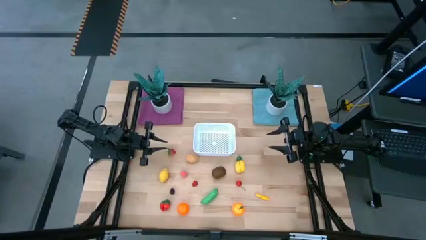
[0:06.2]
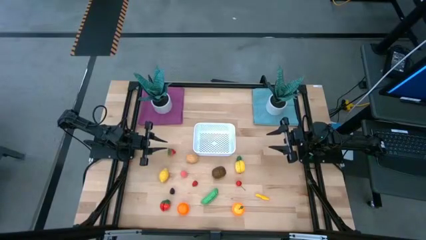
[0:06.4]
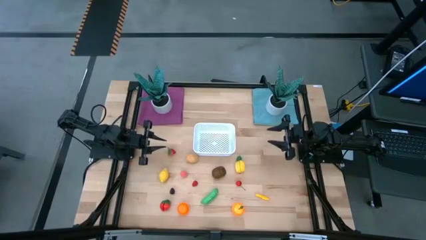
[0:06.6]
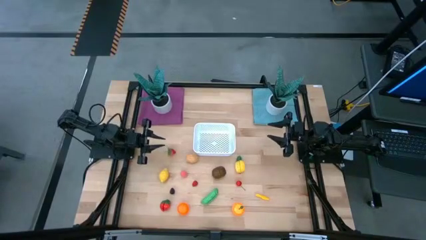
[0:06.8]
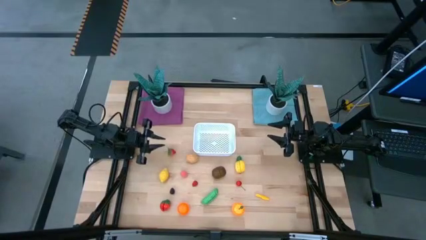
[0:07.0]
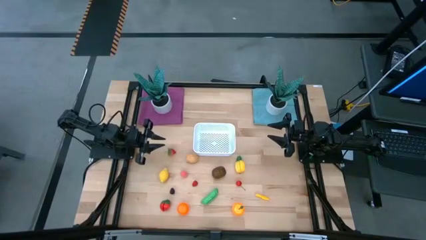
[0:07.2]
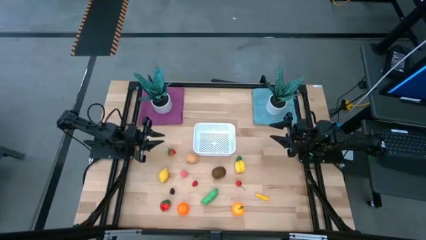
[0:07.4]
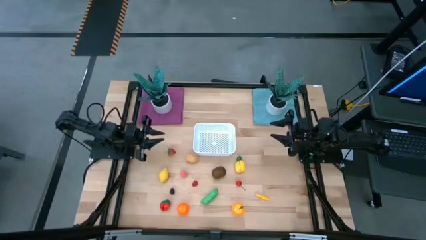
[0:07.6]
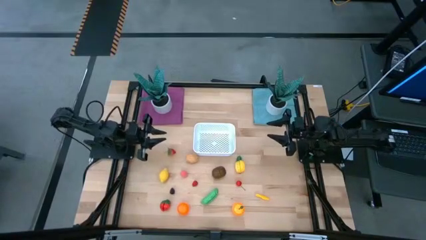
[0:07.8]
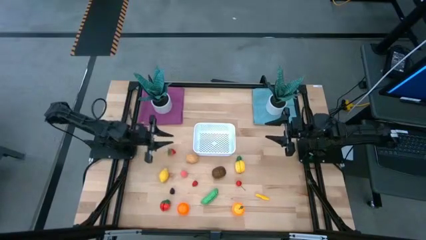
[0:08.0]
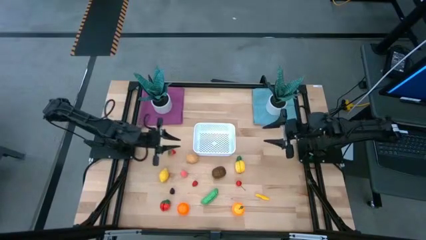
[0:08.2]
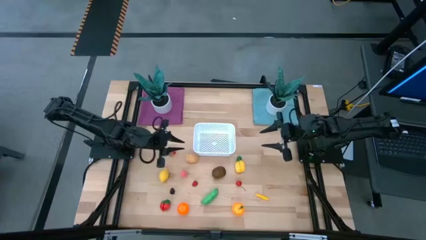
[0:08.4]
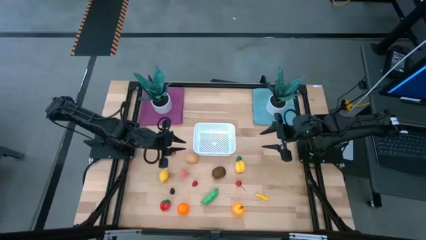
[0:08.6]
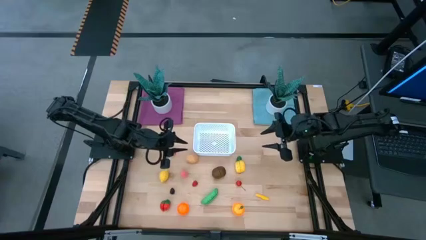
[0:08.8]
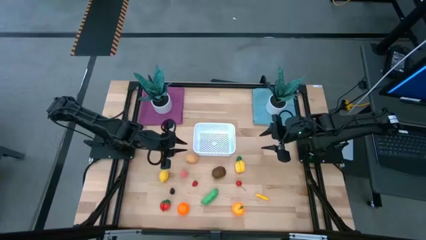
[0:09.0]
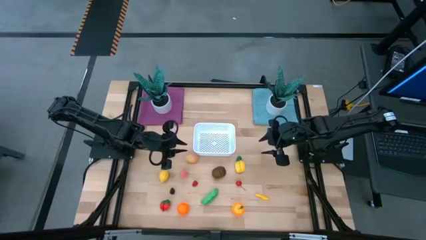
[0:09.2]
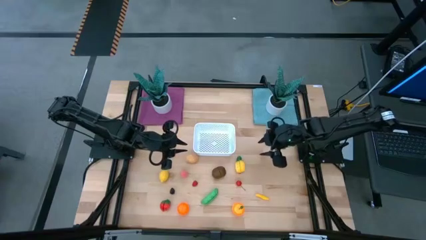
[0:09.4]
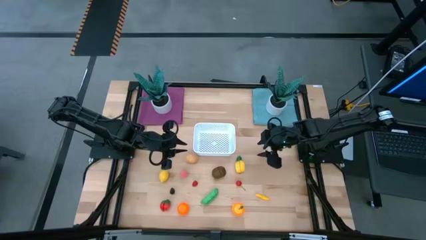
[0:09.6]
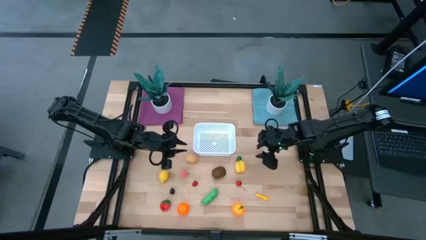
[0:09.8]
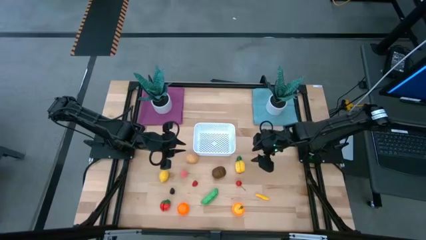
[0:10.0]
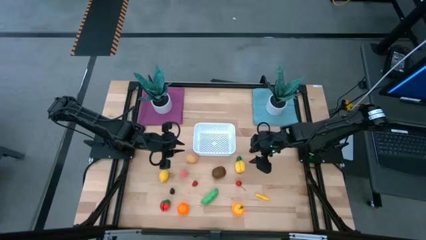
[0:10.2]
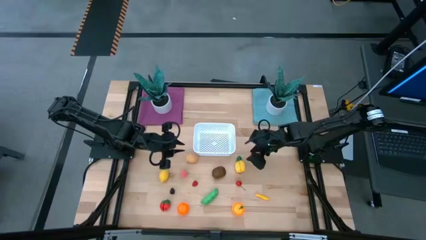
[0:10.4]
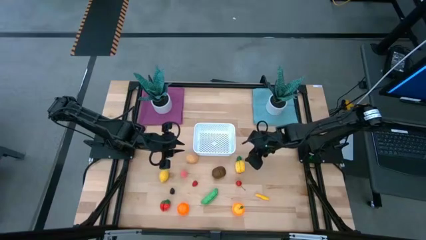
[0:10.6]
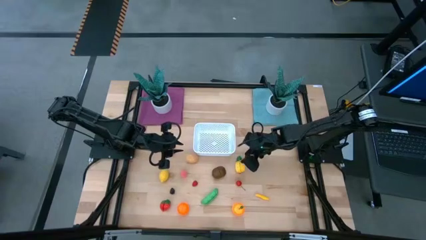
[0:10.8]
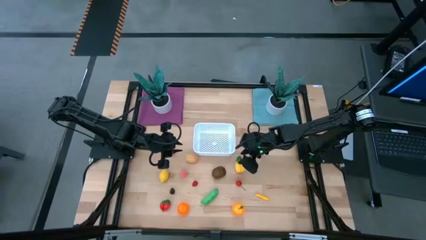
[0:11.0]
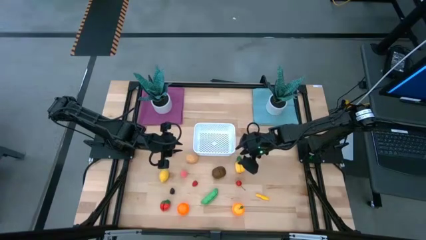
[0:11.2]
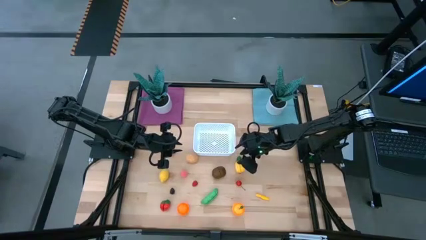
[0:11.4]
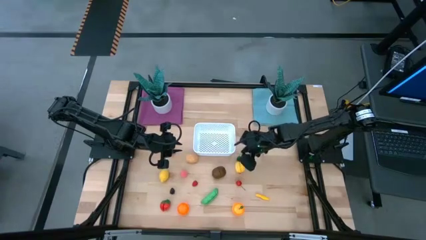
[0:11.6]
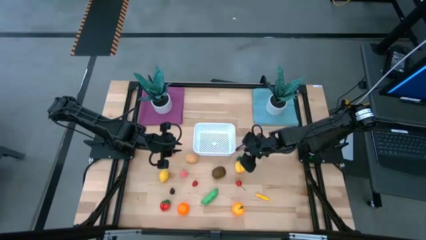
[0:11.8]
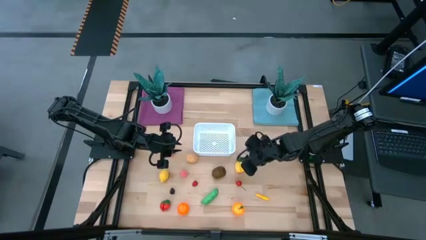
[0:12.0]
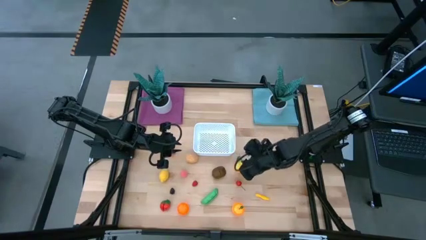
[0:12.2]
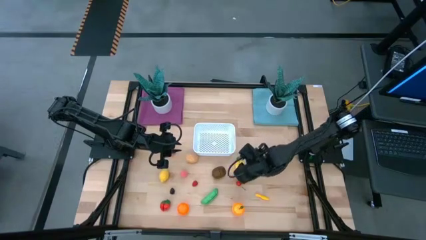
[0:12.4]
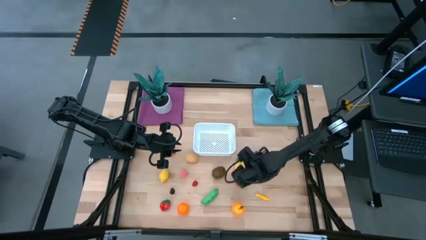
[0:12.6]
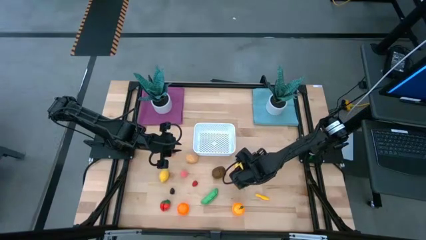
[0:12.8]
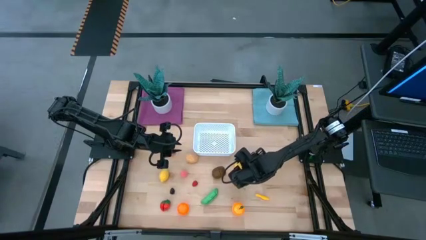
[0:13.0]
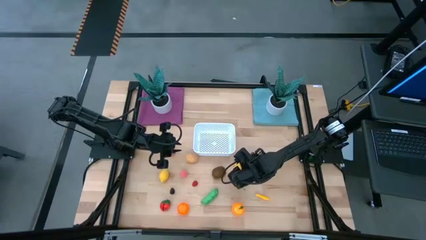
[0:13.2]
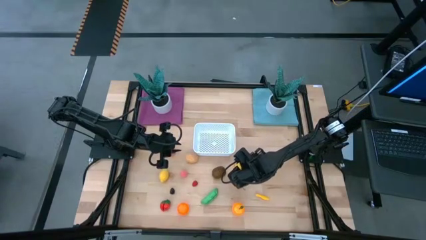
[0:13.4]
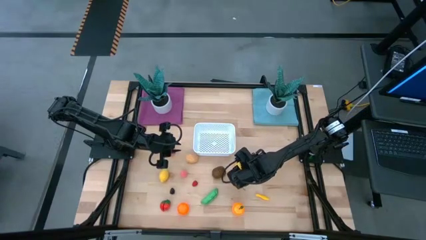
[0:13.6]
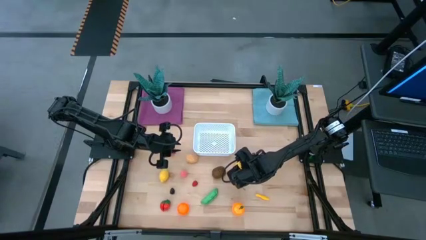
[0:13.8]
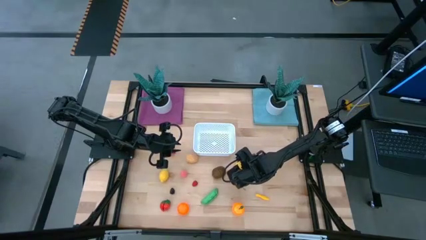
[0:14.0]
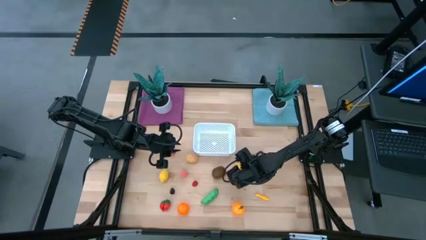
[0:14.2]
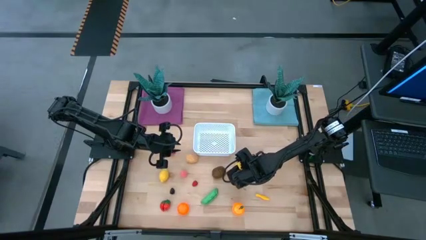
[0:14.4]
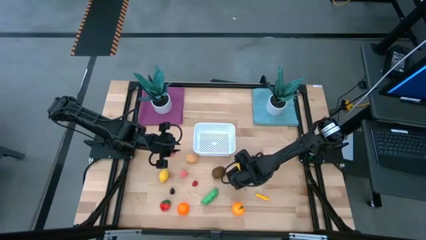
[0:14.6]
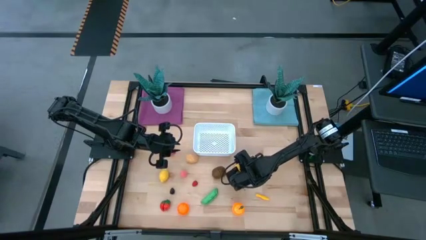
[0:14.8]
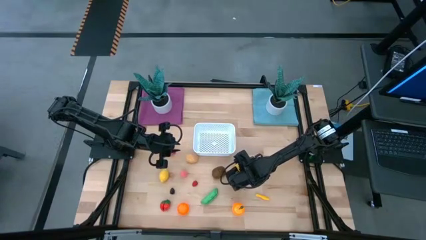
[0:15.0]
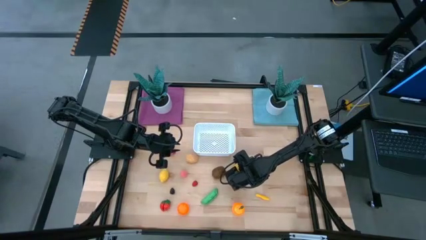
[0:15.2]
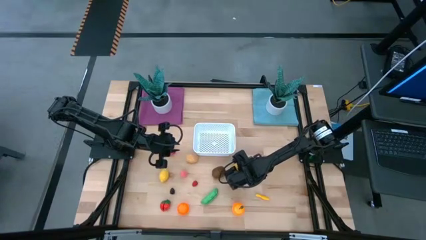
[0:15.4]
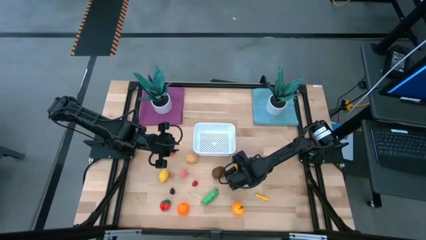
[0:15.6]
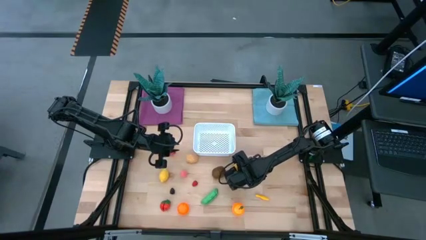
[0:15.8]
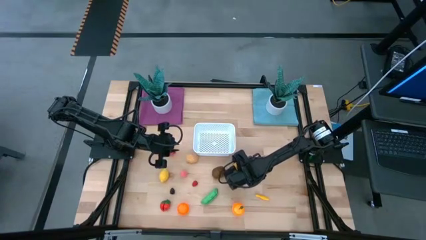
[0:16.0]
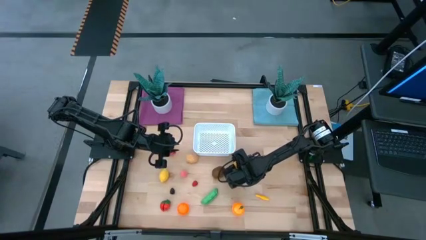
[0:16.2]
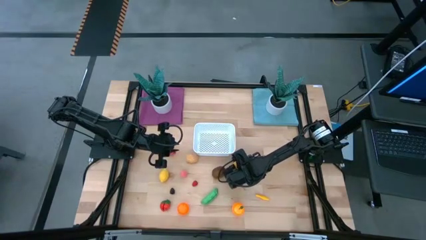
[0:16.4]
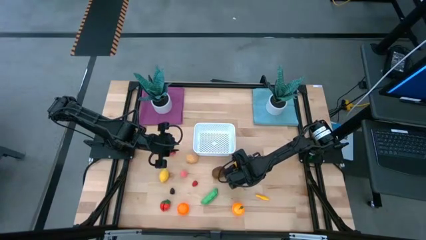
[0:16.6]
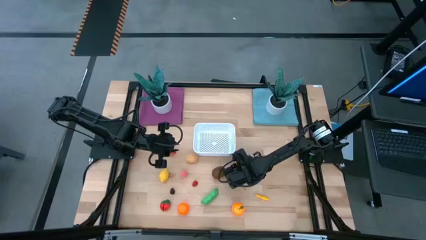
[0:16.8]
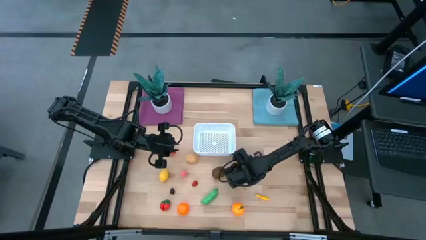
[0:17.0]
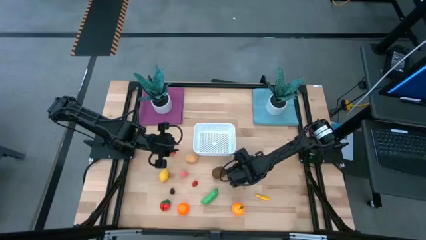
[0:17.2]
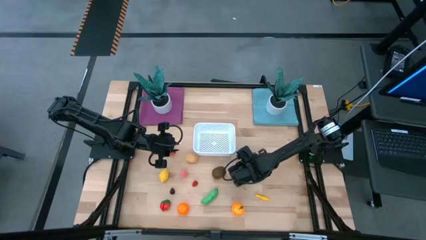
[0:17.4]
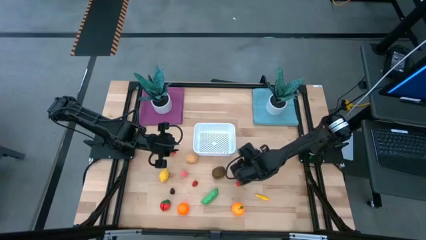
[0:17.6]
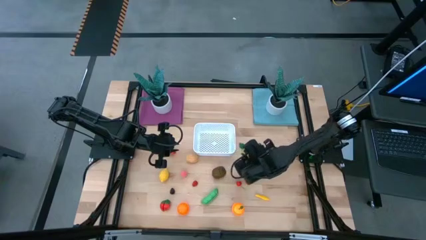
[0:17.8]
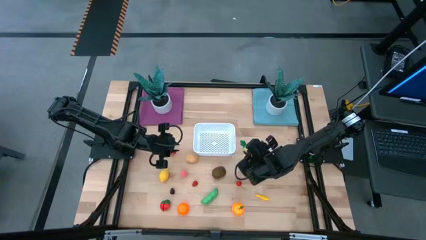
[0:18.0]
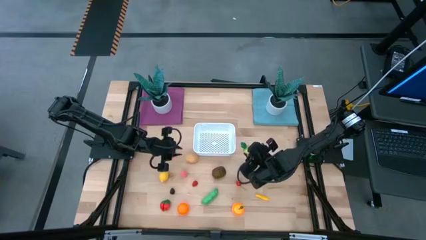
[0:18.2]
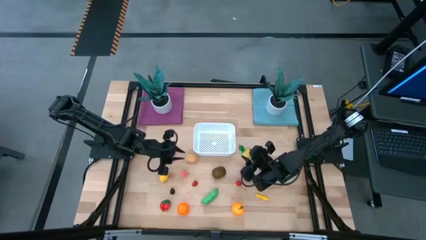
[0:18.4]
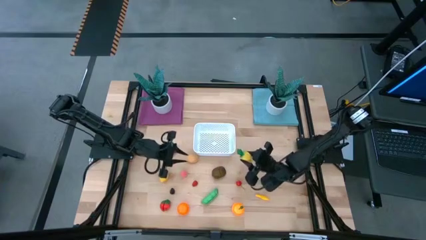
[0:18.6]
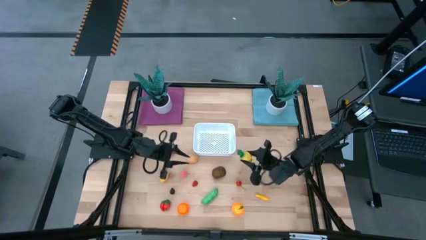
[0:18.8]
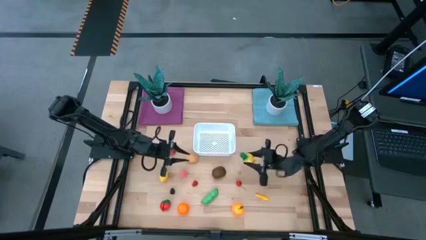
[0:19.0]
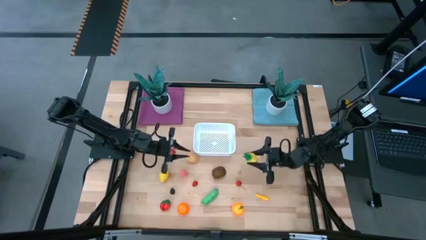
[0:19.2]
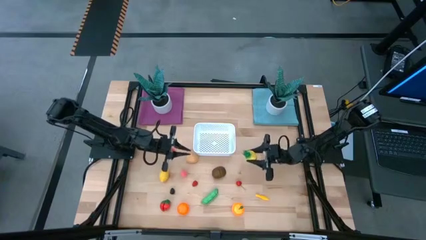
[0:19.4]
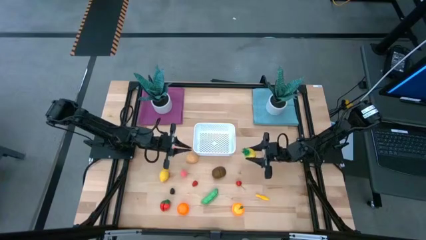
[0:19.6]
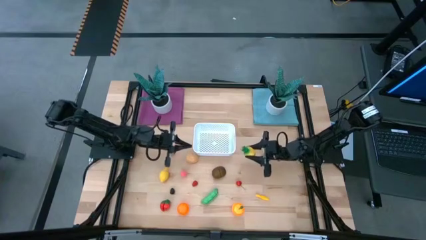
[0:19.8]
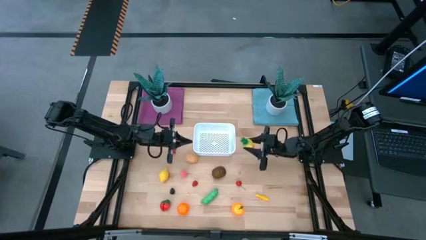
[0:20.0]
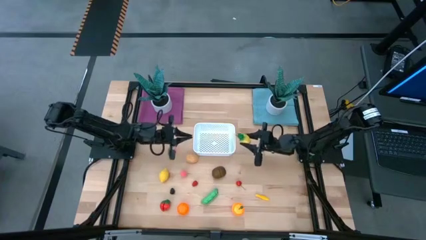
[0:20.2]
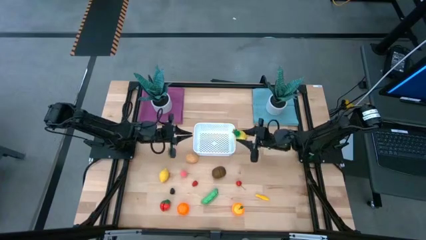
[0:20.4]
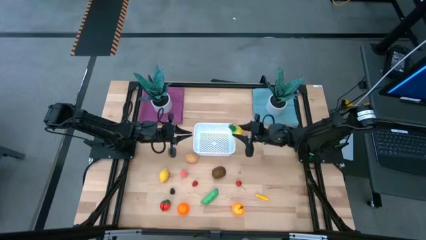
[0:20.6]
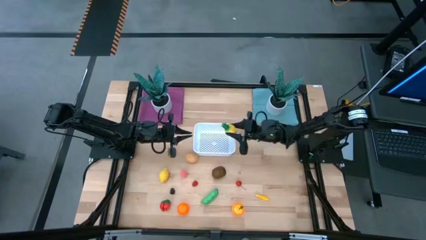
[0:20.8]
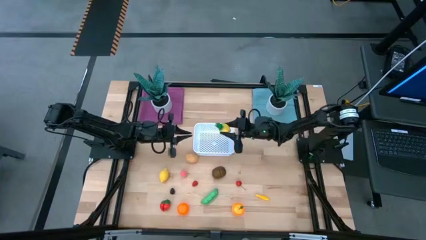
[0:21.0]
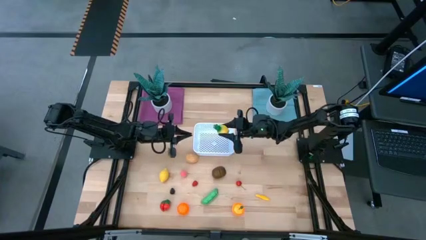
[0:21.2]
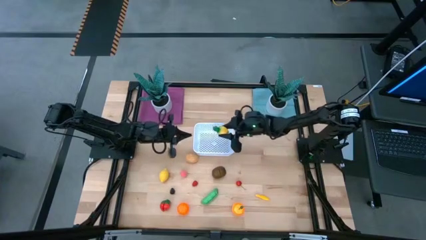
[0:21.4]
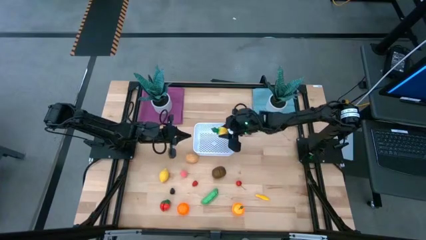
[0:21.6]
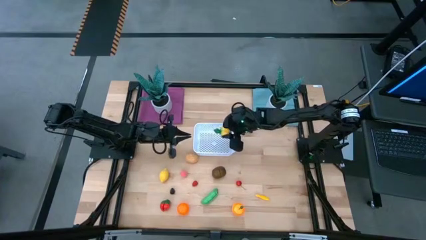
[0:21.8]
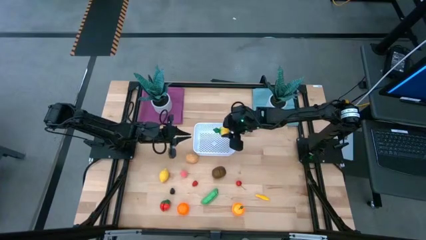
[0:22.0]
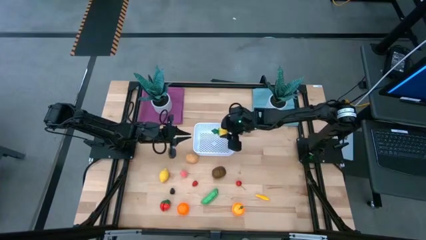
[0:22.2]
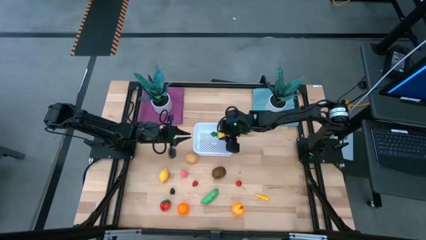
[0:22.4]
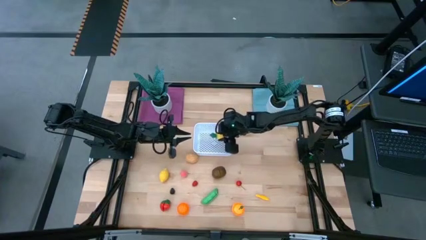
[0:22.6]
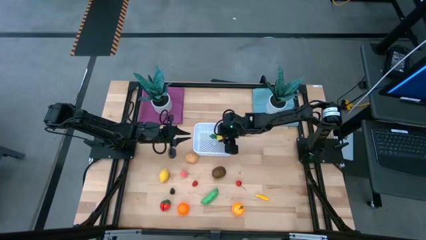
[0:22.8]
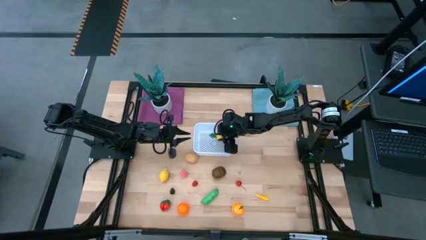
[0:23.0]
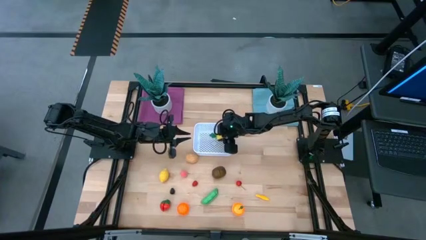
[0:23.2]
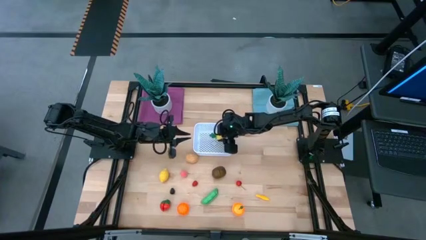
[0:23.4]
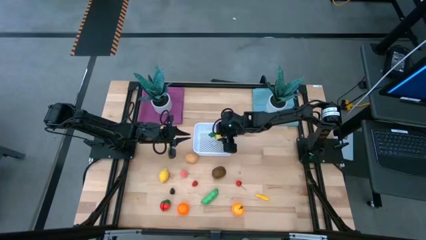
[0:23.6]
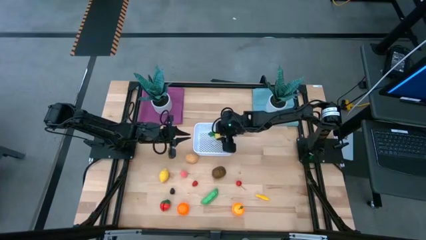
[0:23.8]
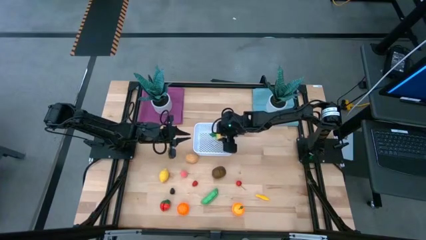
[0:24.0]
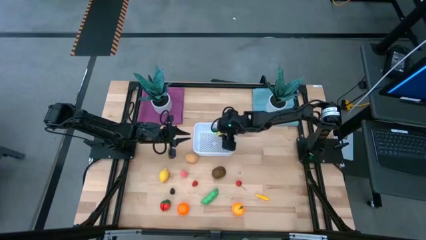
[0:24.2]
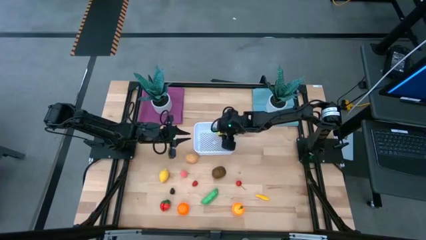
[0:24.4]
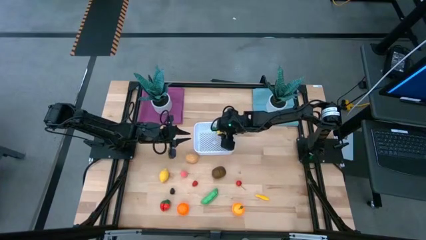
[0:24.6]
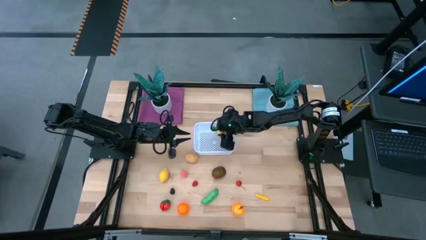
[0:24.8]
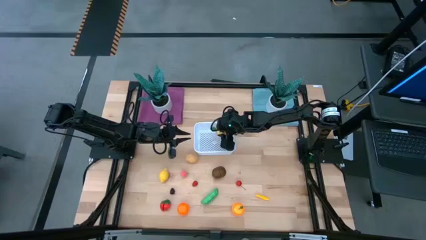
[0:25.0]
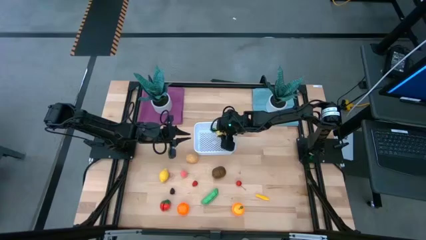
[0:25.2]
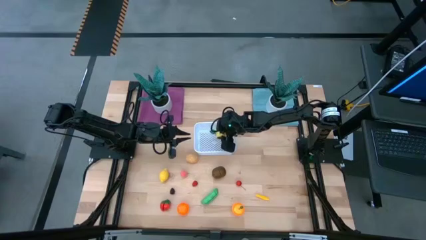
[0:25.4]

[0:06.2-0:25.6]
Task: Pick and placing Produce into tupperware
Put the yellow pineapple into the white bin
